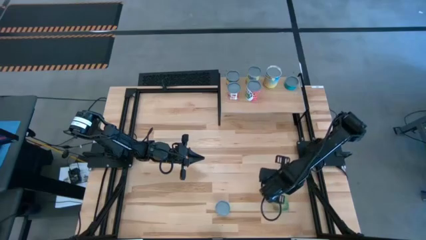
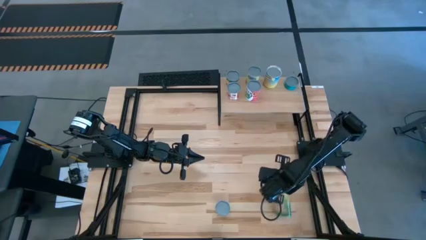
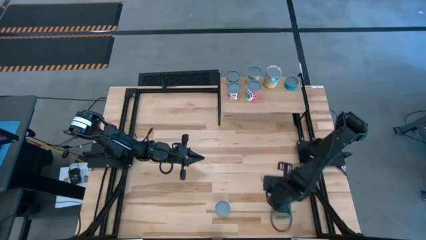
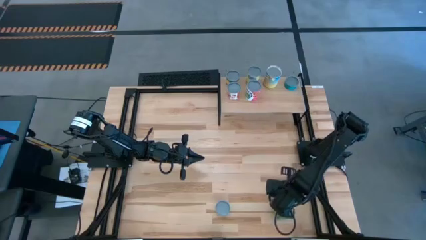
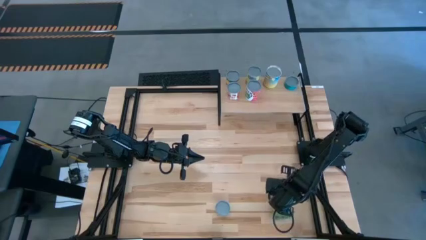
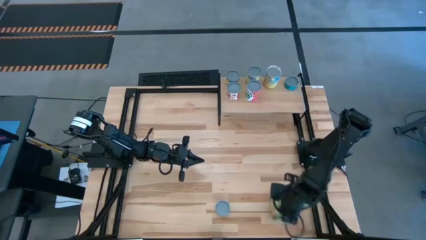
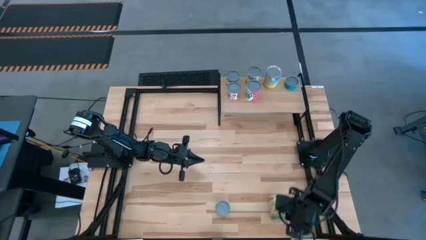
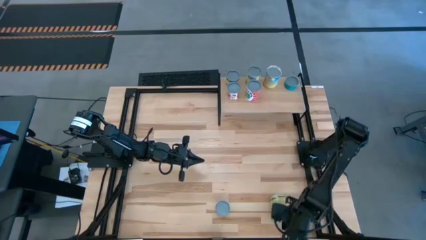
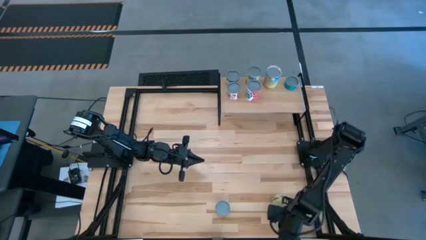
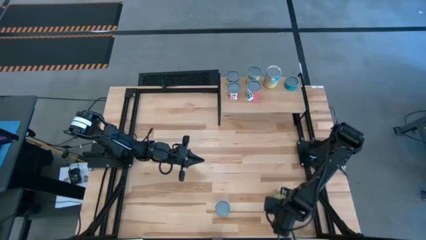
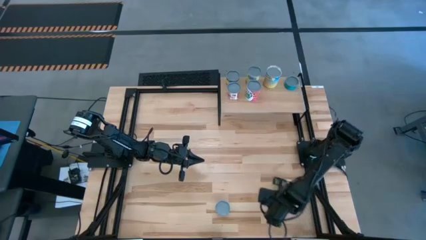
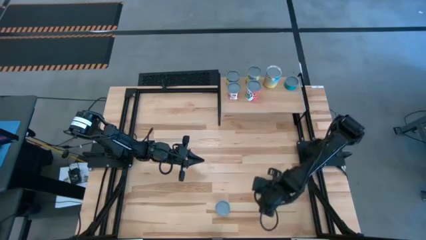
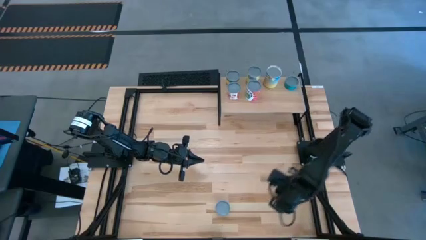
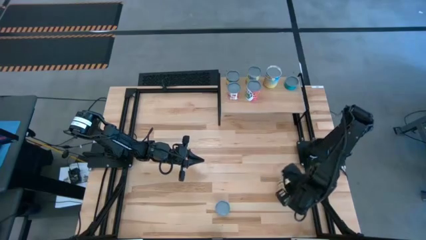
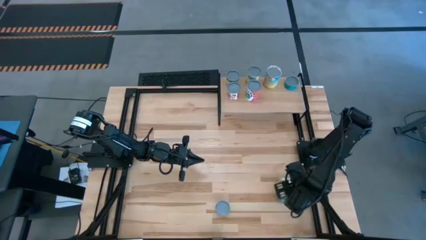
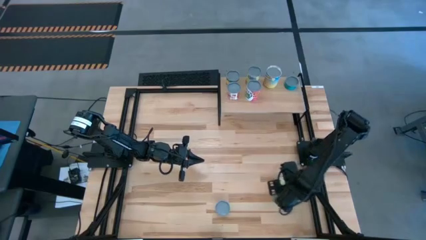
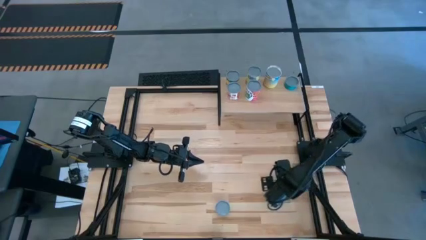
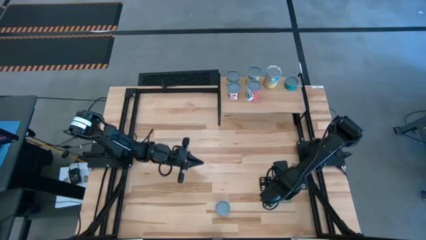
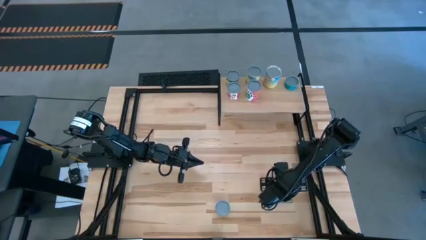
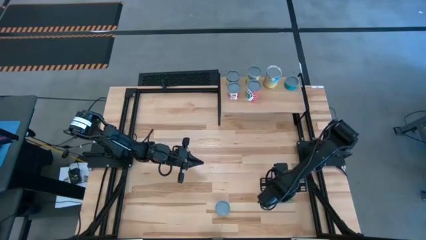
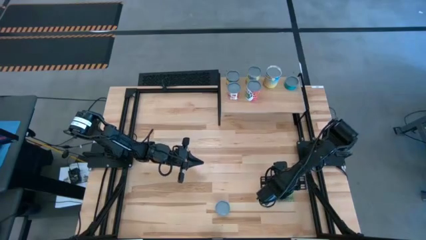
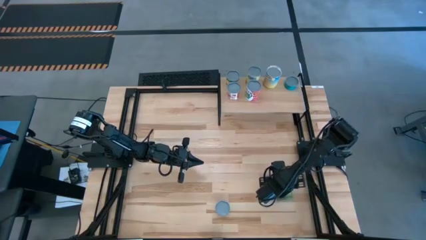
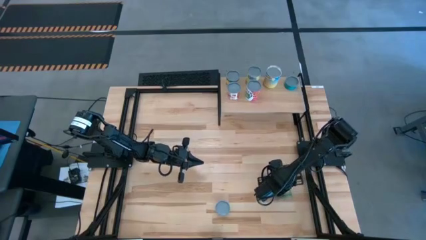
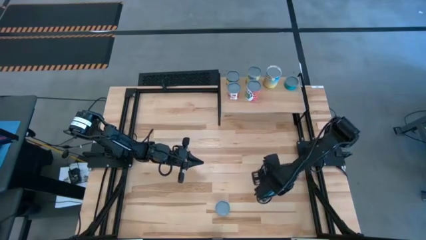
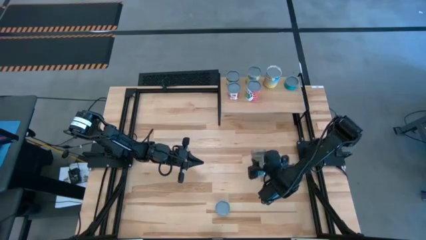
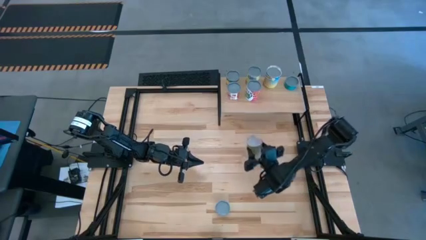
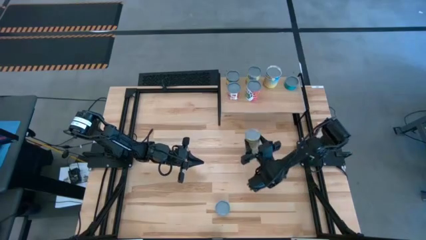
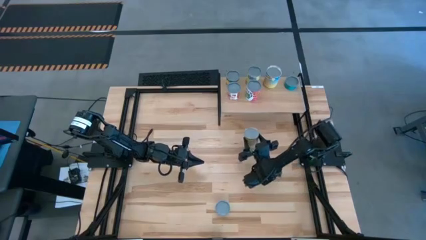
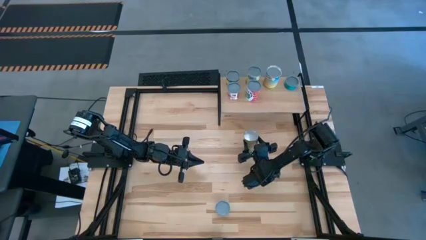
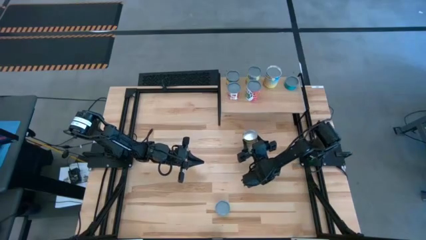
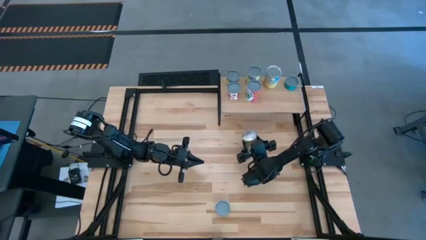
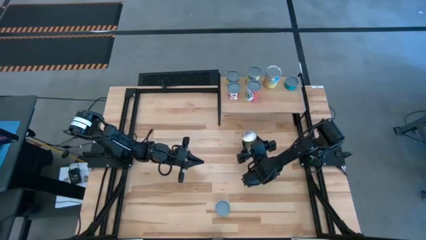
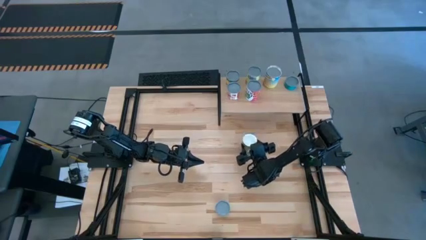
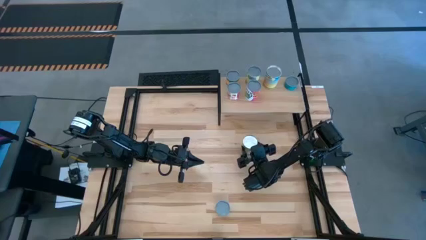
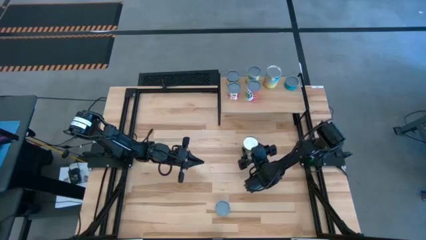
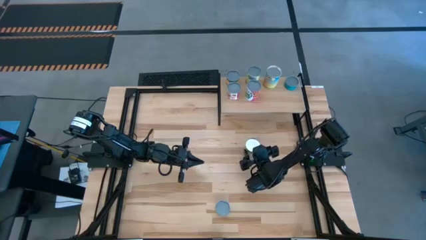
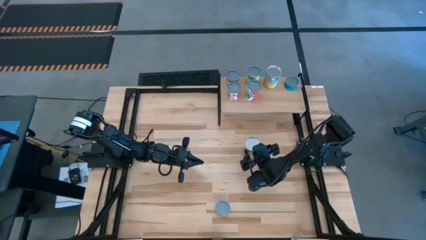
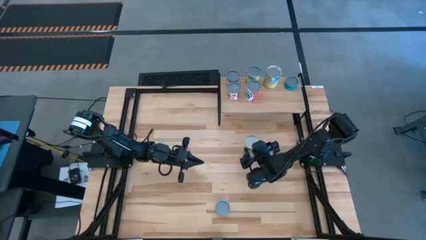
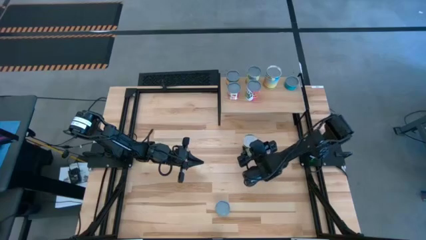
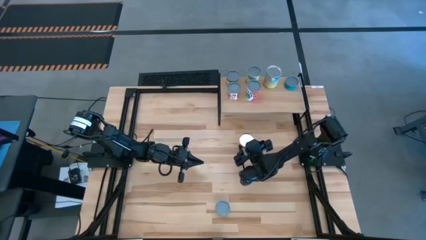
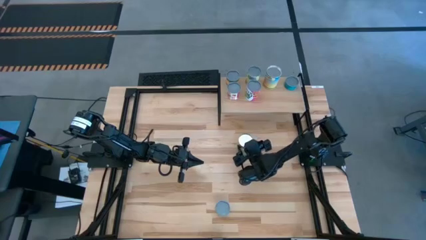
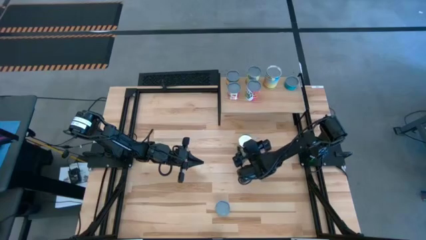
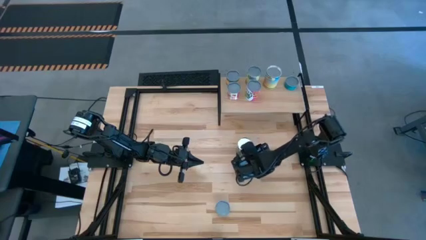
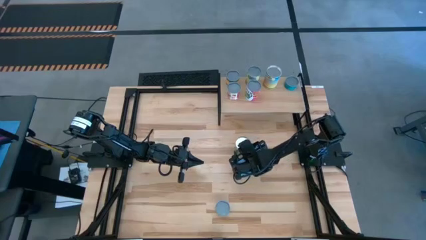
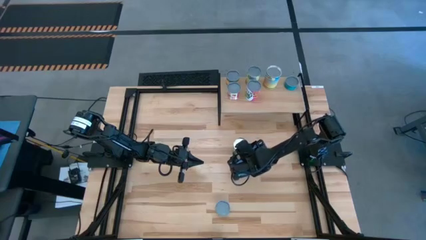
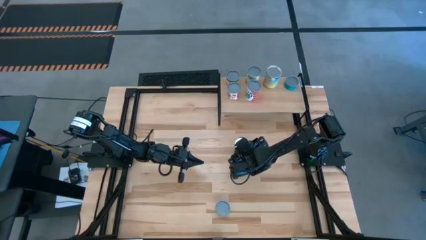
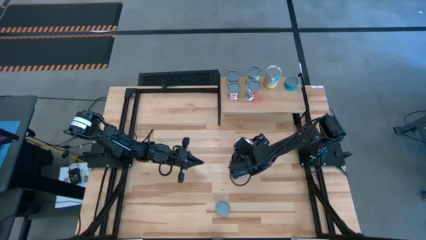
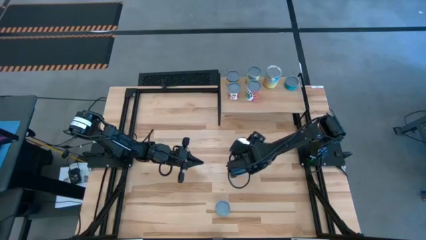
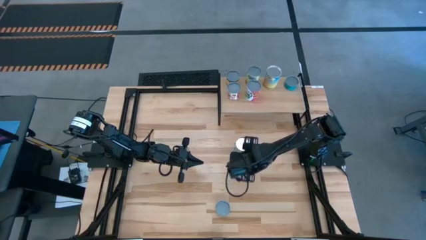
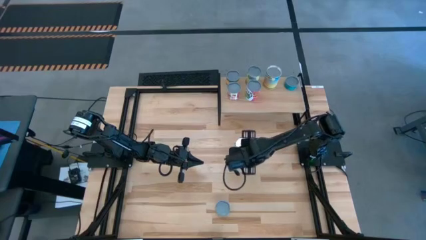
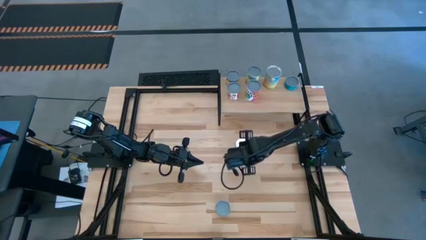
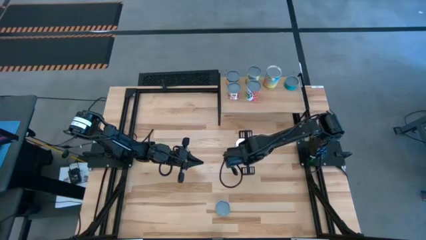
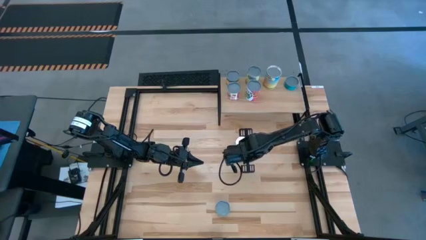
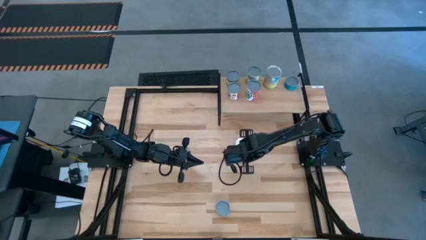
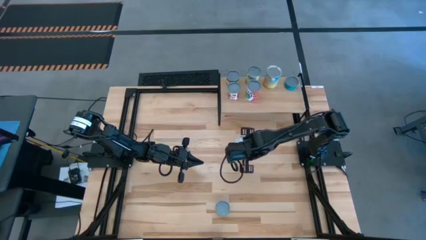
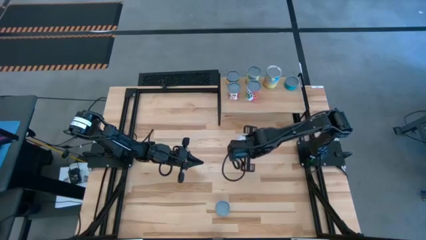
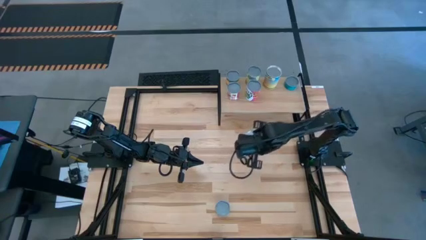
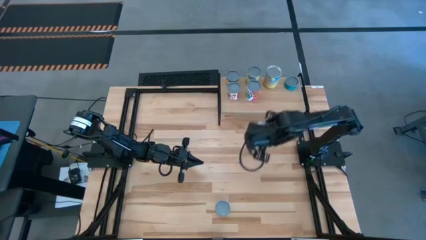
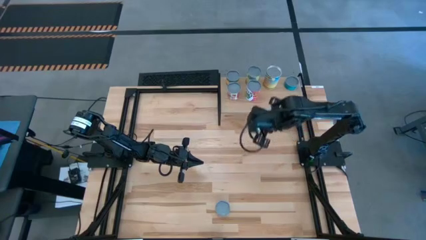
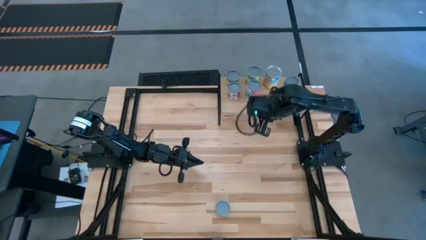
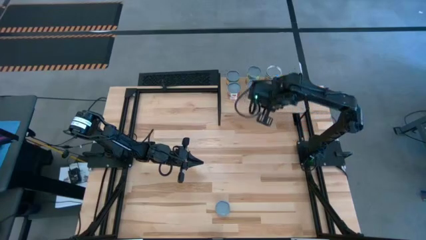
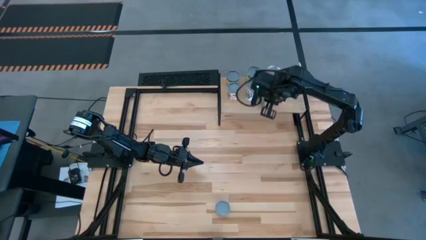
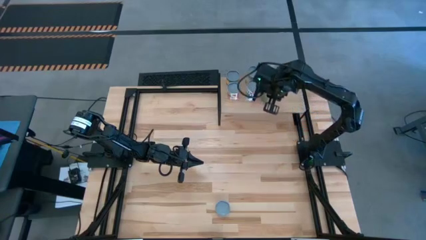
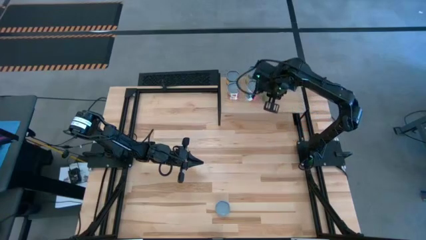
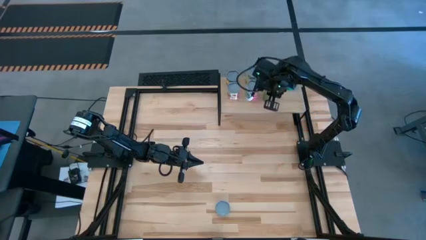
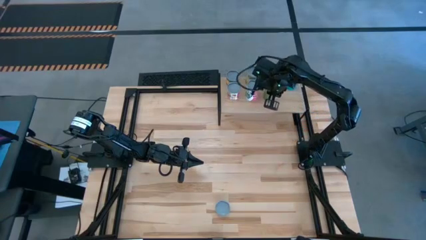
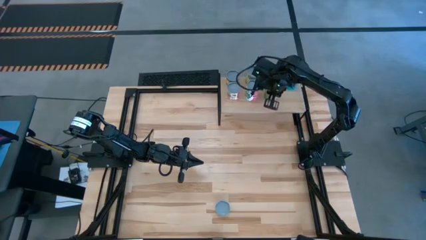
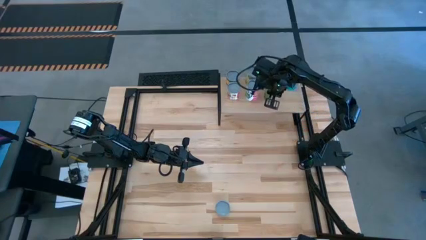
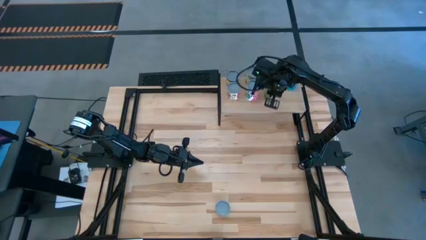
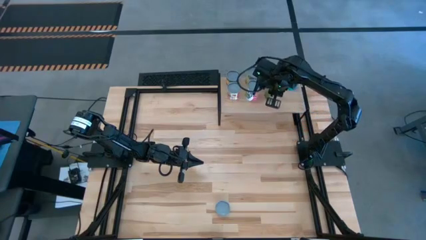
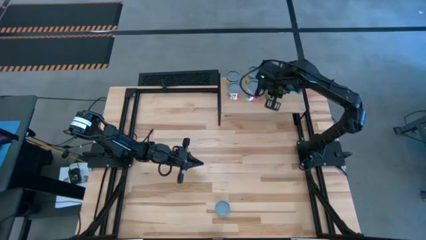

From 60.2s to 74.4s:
Task: Pick and place cans onto a shelf
Put the large canned oranges on the shelf

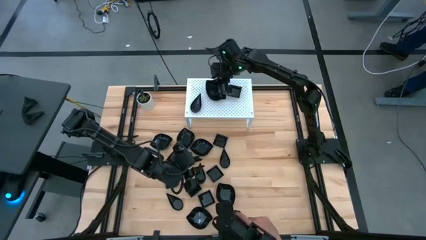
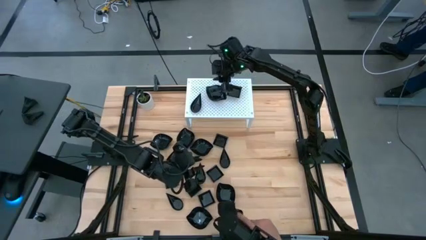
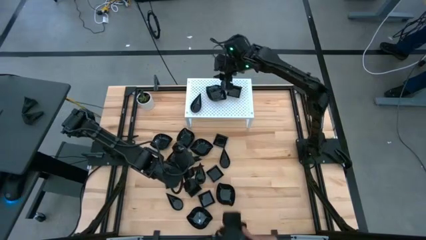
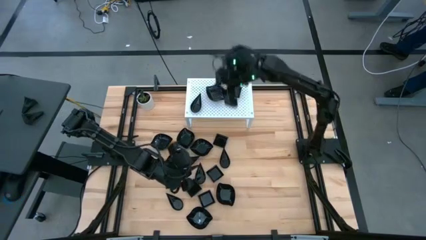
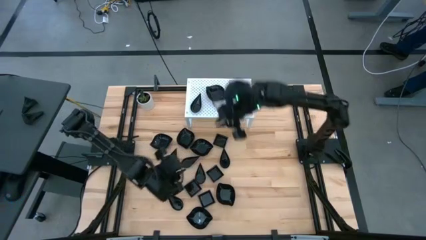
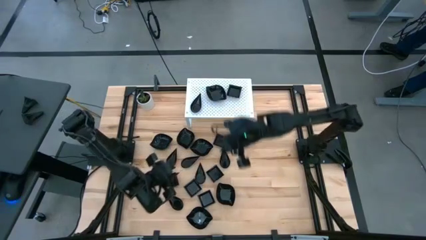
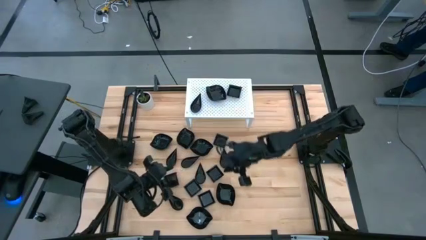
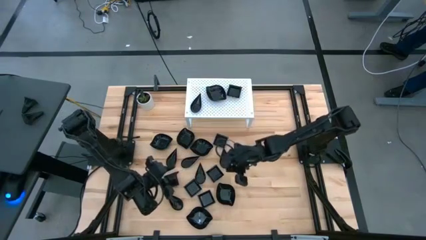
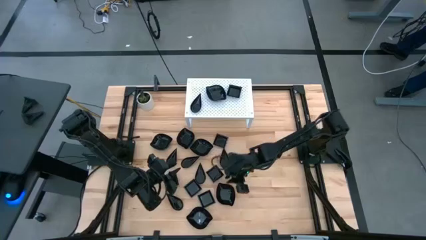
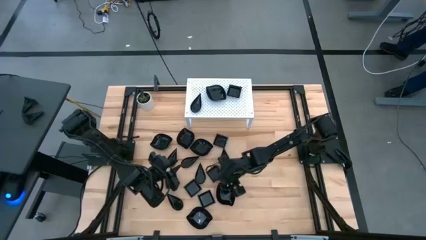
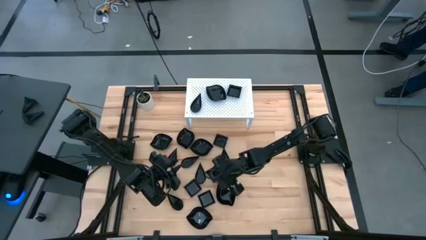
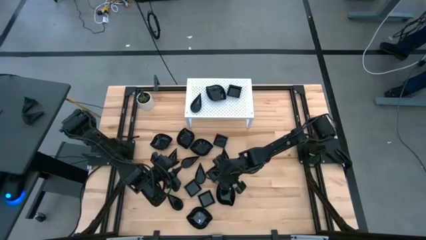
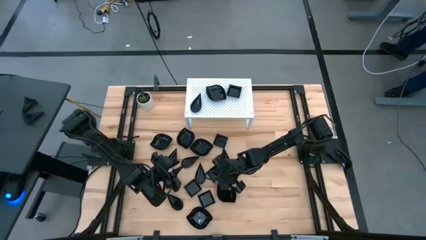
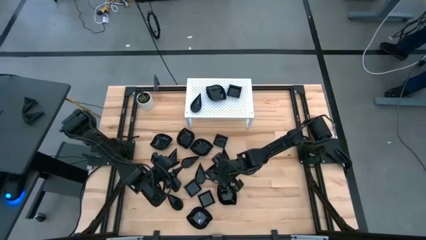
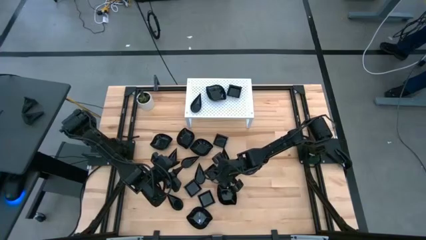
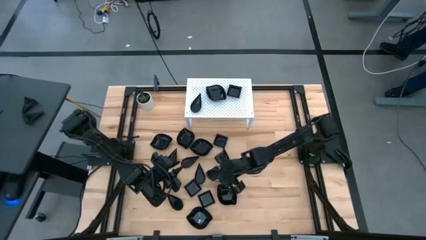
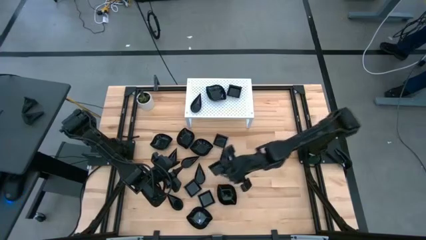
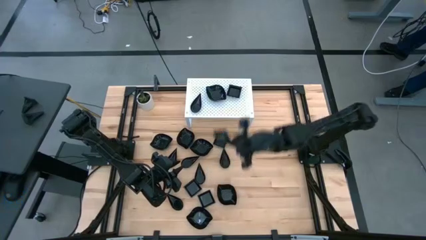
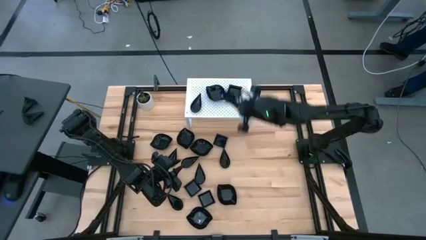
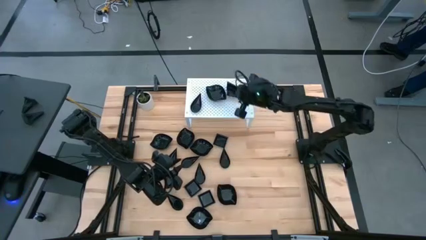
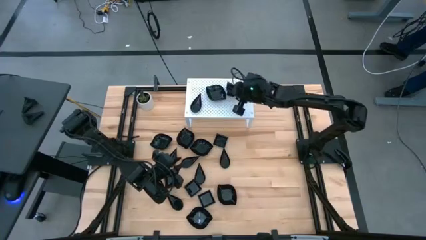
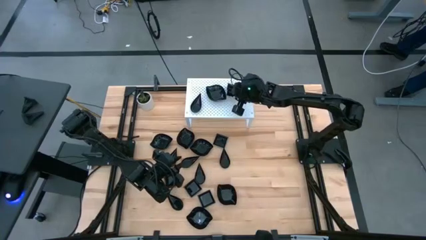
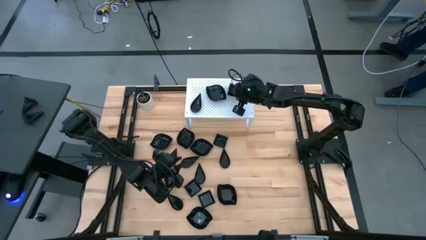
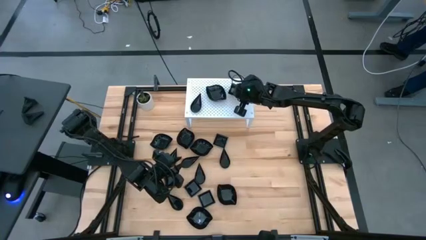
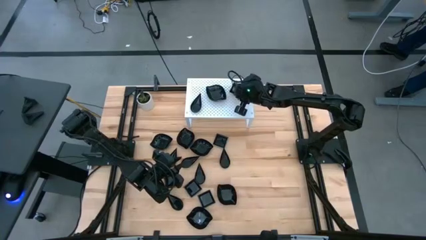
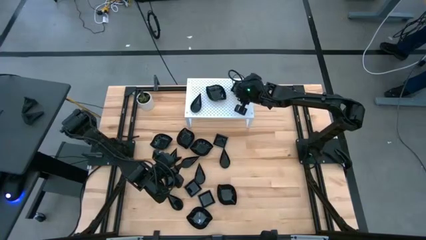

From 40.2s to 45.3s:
Task: Pick & Place Mini shaped plates
Stack the black square plate on top of the other black square plate on the shelf
